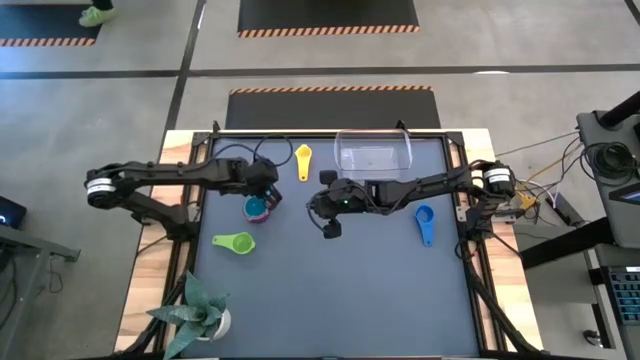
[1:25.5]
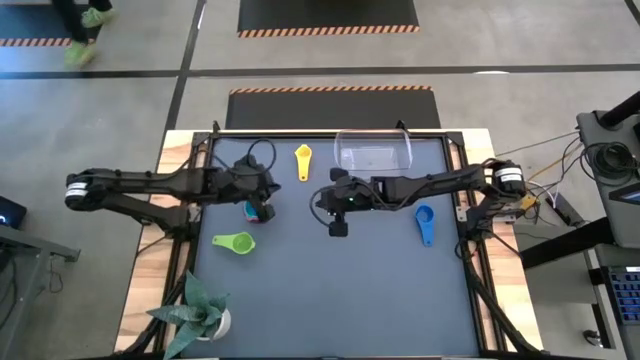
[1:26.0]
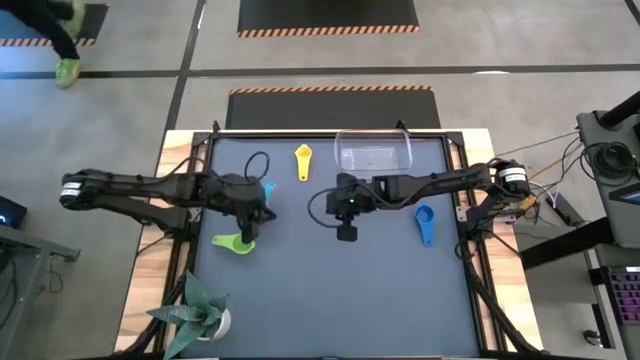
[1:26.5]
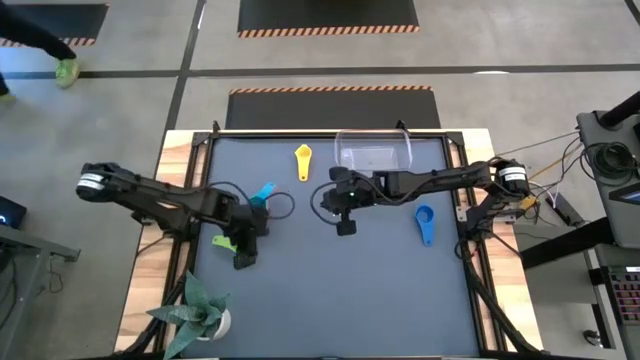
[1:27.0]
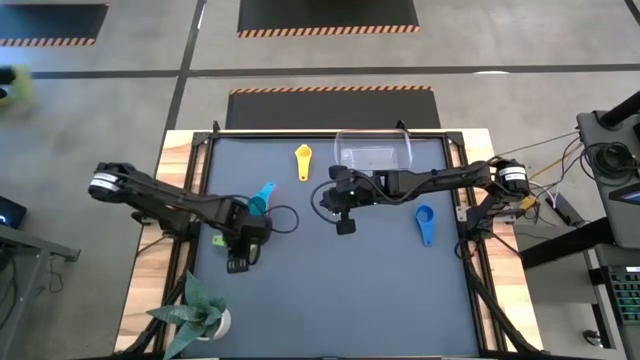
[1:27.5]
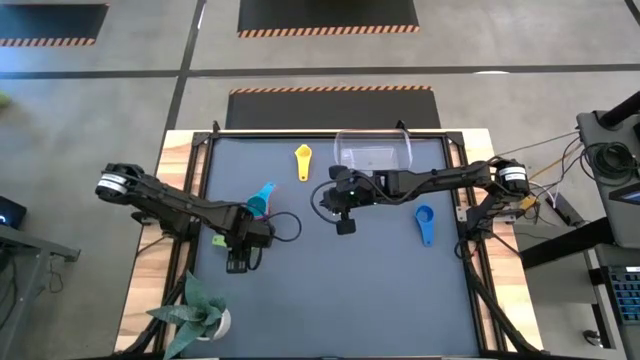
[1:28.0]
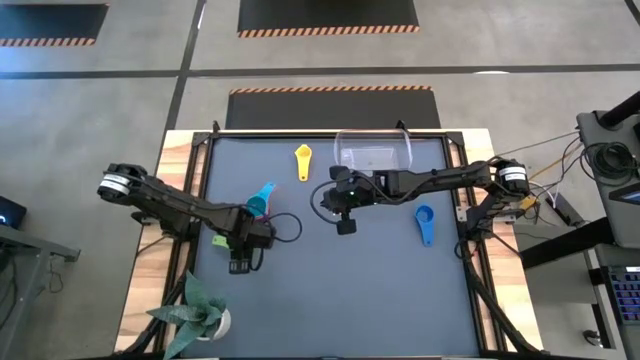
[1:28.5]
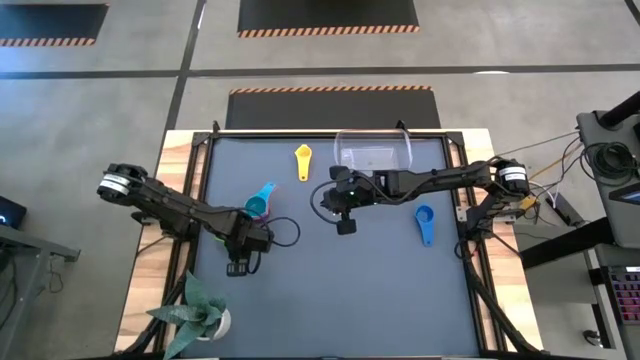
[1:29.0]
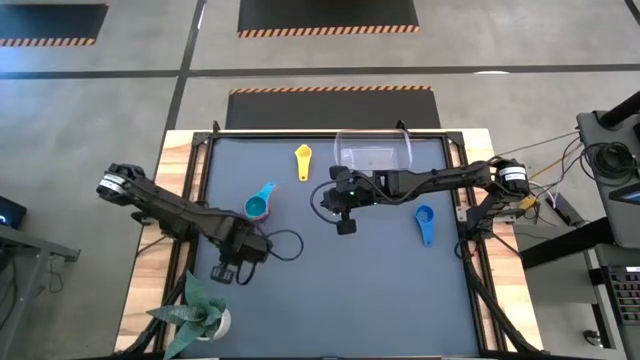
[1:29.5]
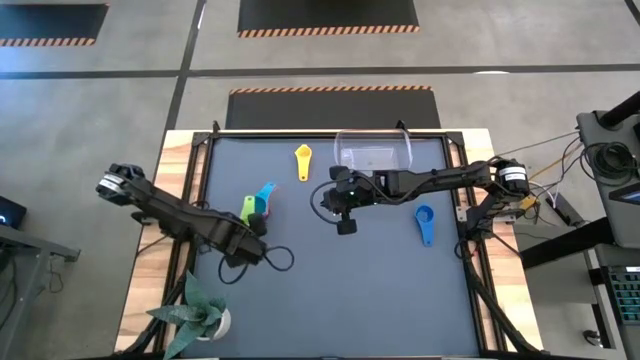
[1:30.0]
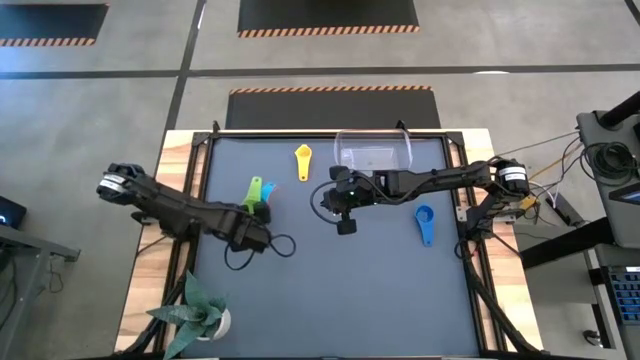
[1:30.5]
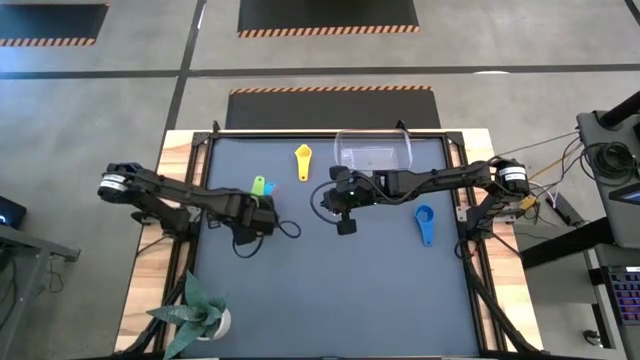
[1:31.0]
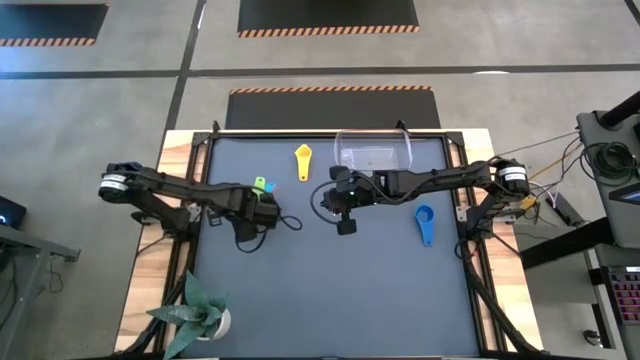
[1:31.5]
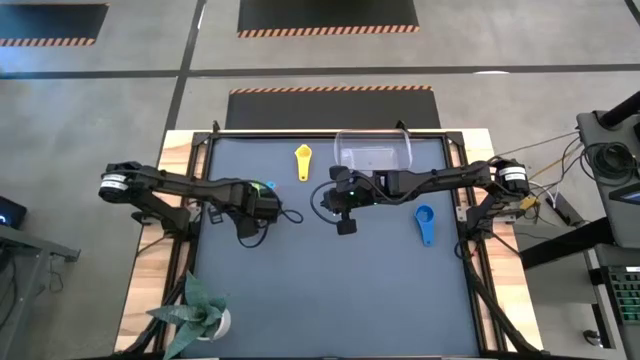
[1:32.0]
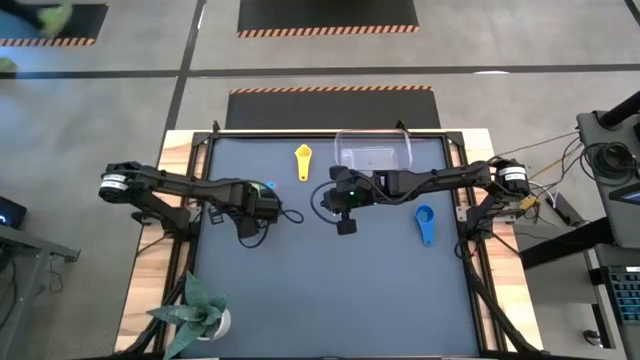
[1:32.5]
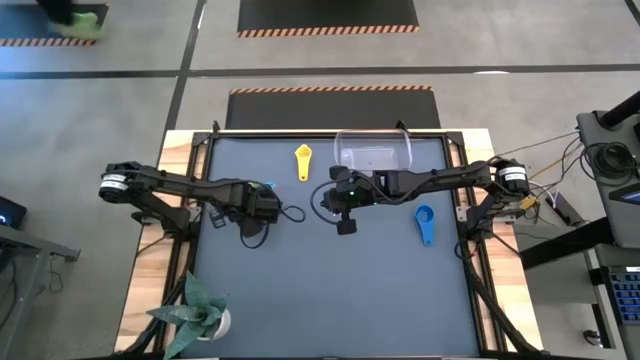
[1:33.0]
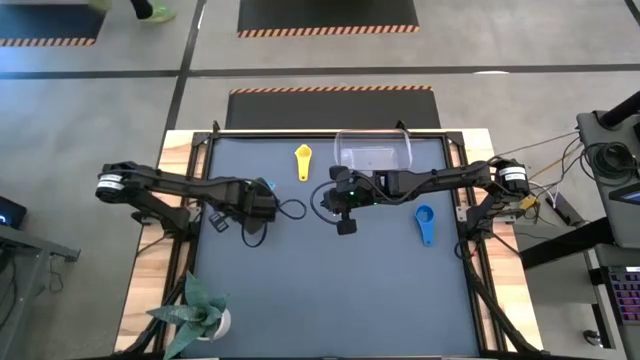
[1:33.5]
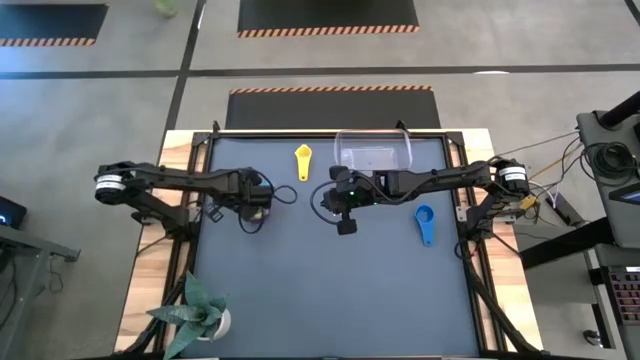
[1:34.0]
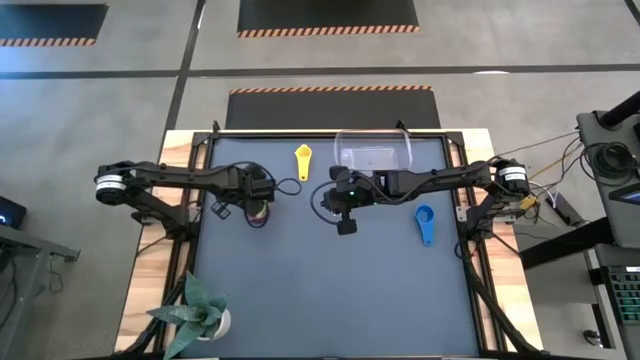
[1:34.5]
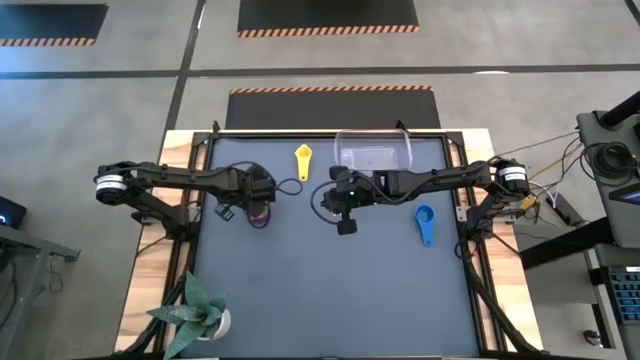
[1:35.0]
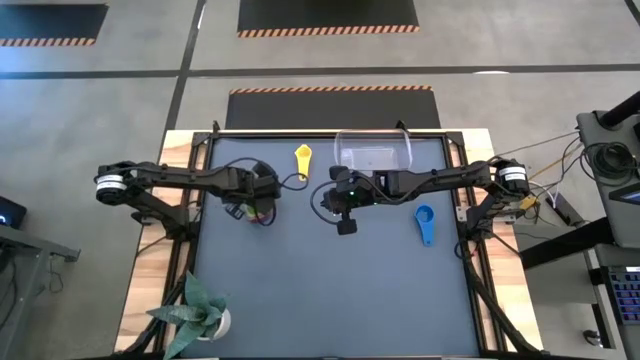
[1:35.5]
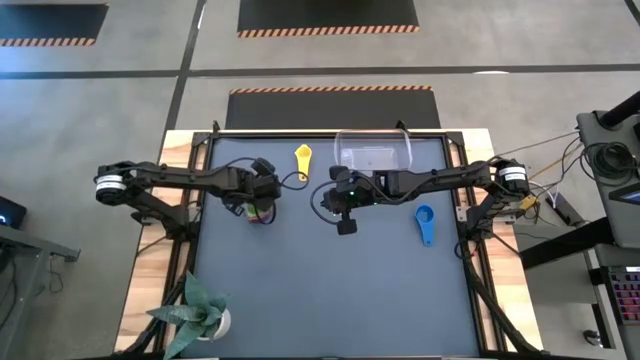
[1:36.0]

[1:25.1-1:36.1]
Task: Nest measuring cups in basket
Stack the green measuring cup on top of the light blue measuring cup

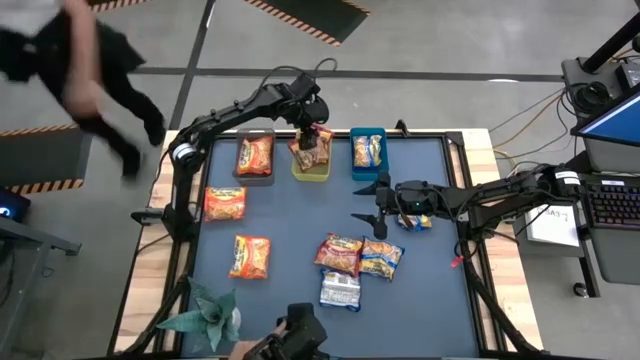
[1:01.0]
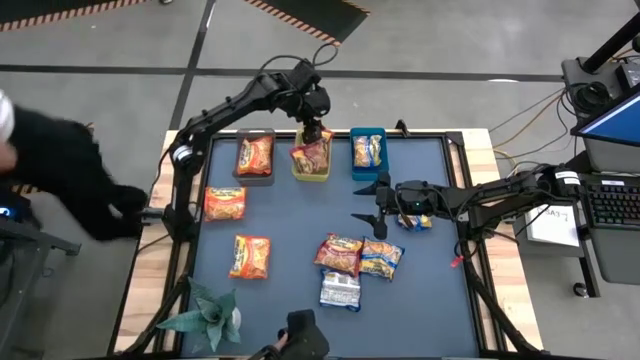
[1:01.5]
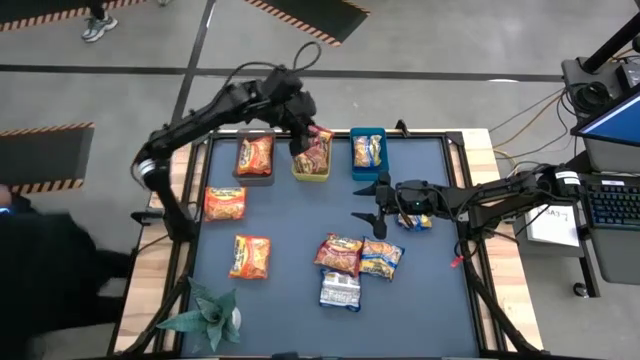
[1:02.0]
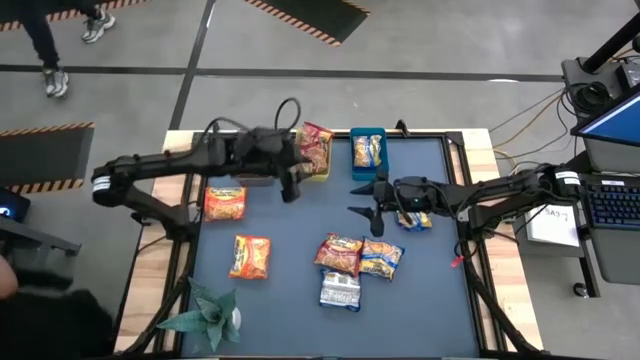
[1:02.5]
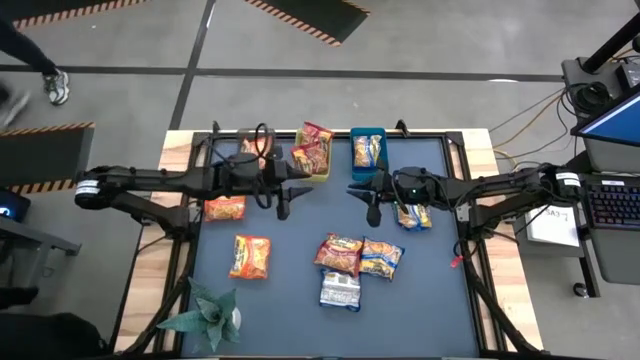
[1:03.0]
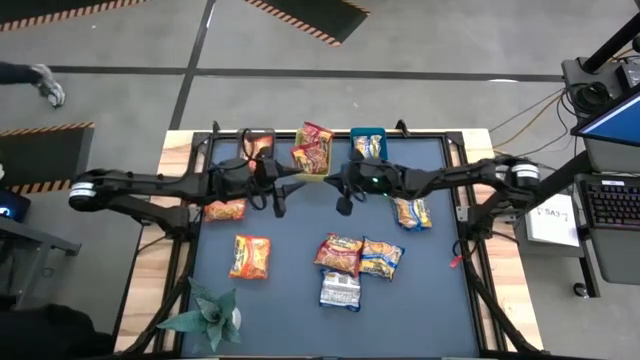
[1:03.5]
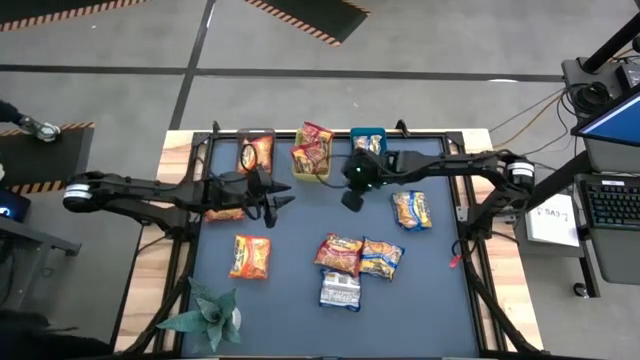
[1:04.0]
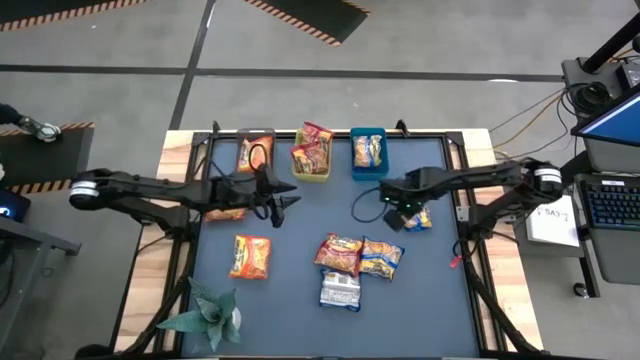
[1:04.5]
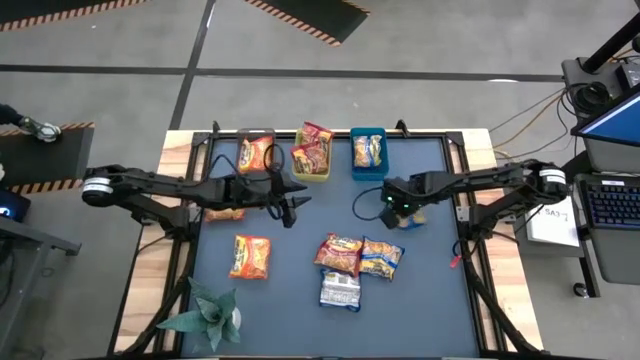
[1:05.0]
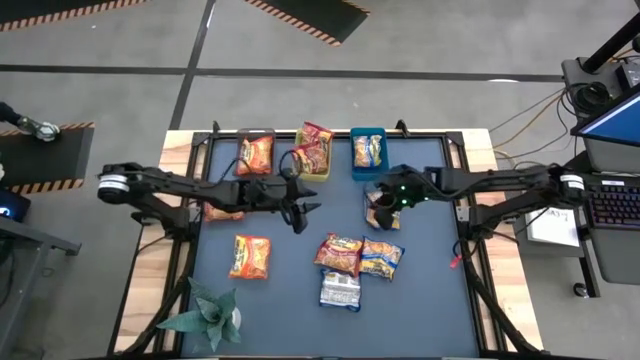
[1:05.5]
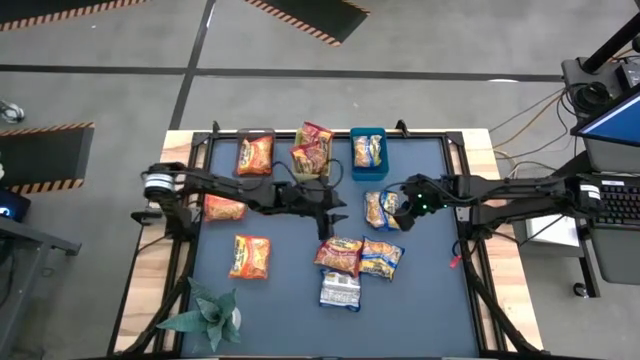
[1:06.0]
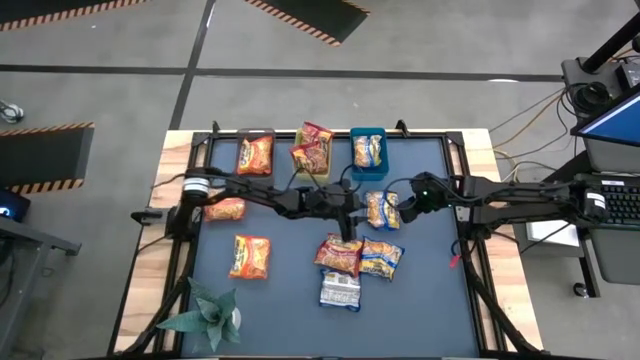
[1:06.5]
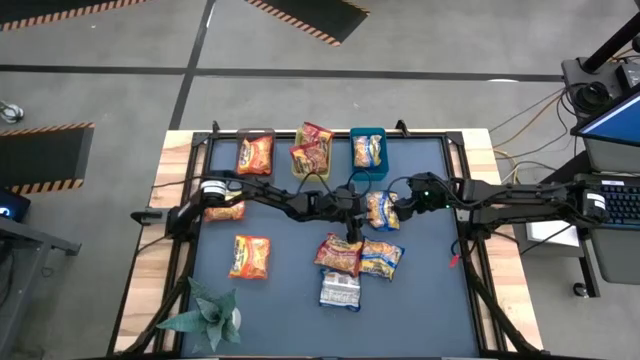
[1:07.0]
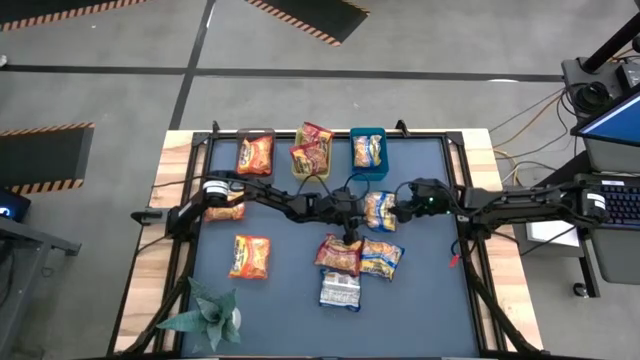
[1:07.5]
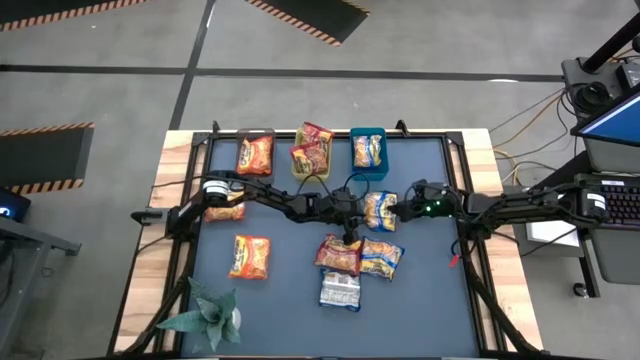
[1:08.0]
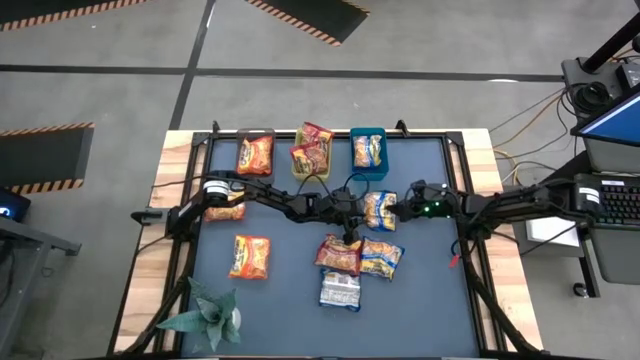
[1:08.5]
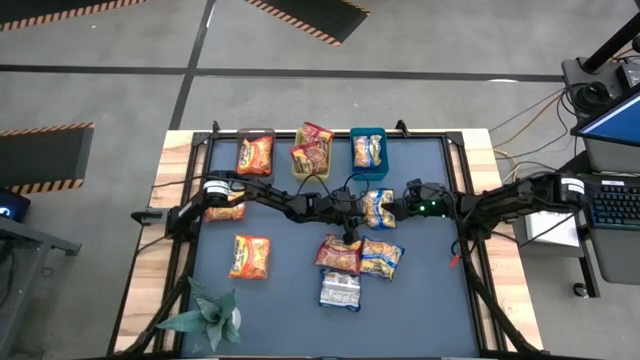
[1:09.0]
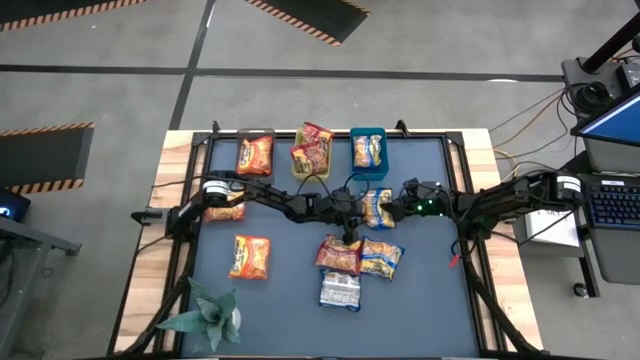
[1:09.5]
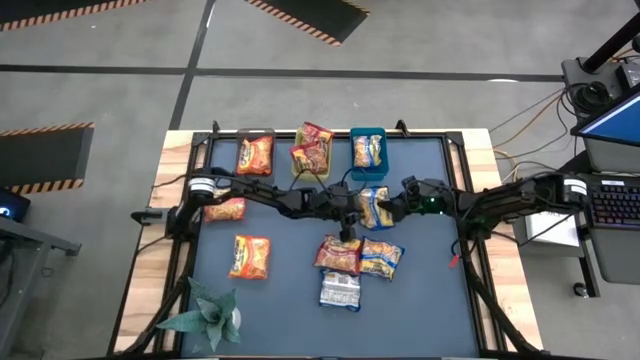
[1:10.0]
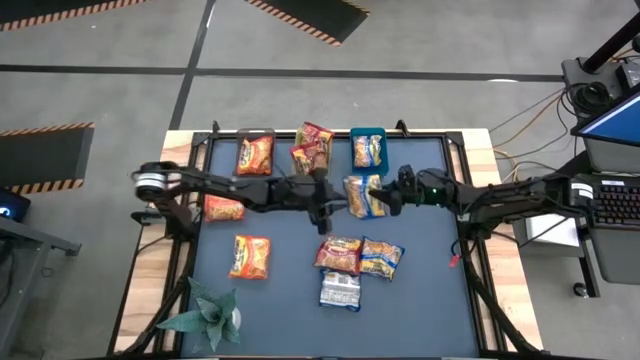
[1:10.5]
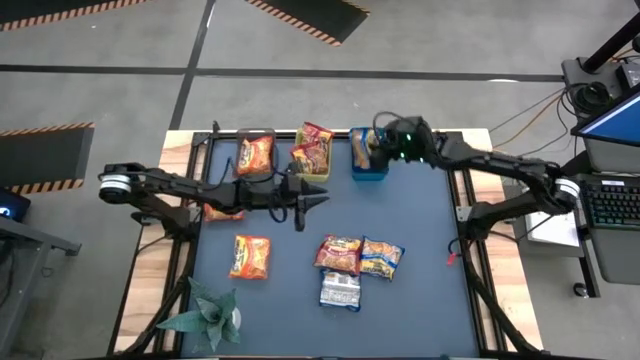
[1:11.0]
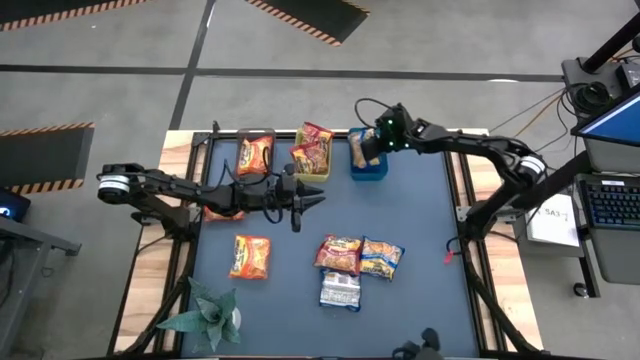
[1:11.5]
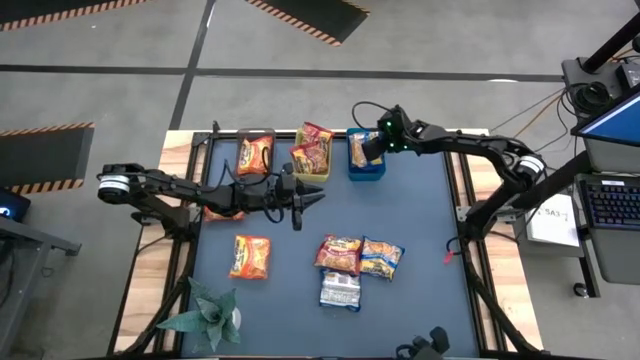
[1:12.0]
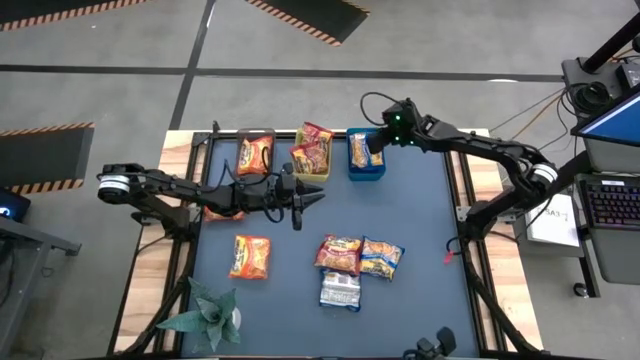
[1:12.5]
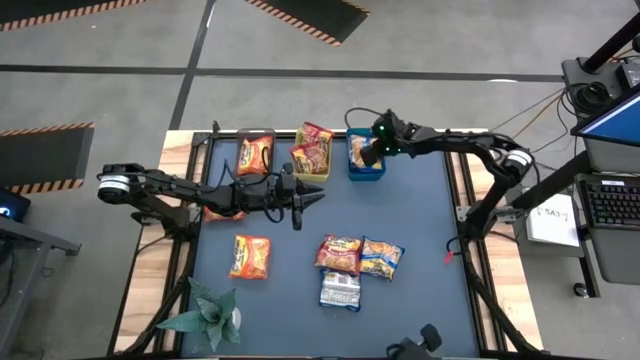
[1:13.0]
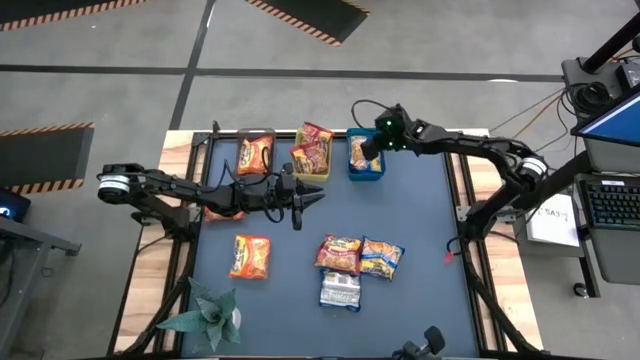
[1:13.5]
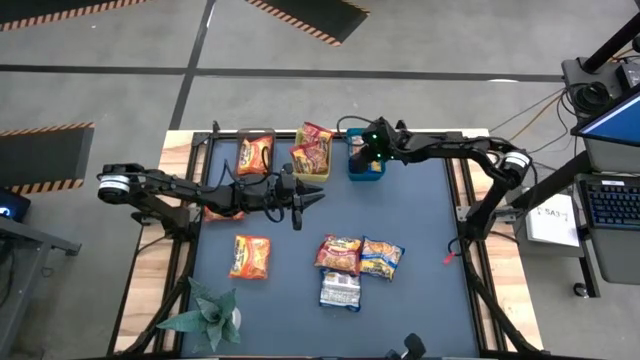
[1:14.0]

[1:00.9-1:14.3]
Task: Sort Maruchan noodles
Put the blue noodle pack into the blue bin
